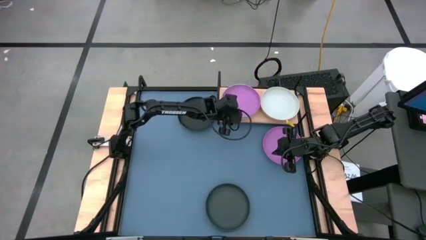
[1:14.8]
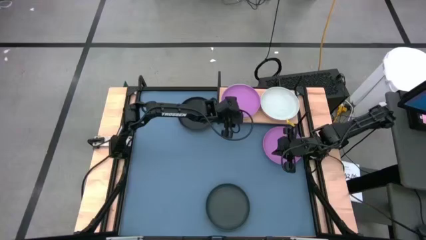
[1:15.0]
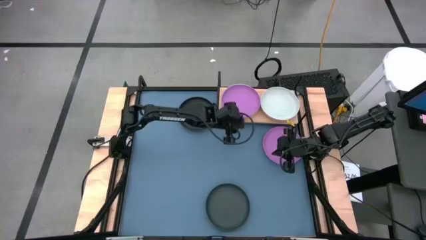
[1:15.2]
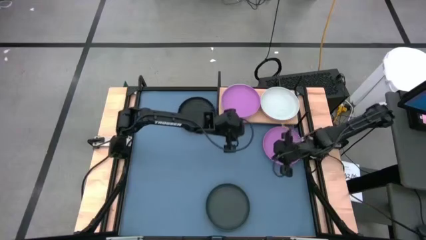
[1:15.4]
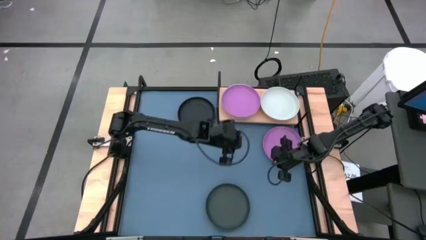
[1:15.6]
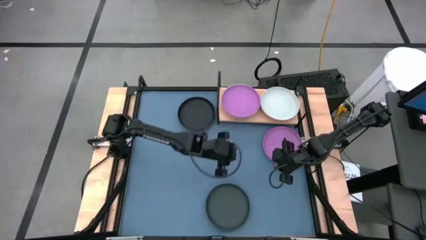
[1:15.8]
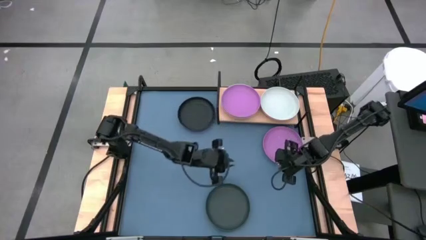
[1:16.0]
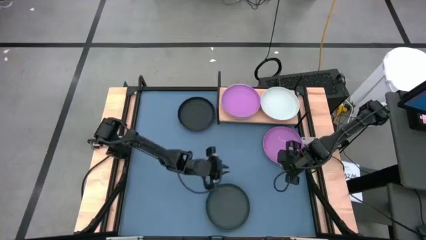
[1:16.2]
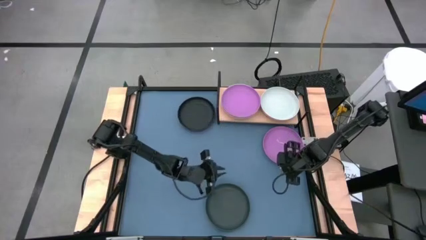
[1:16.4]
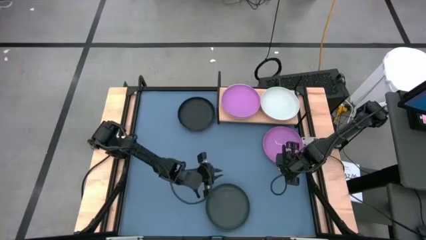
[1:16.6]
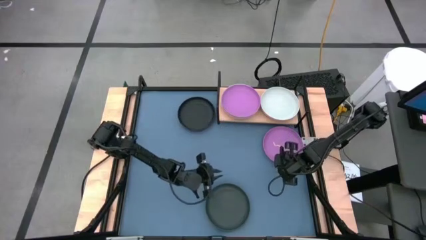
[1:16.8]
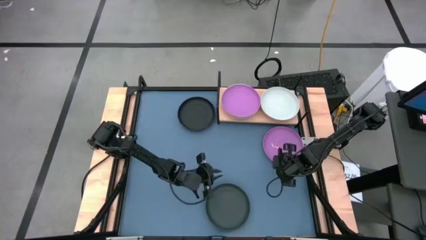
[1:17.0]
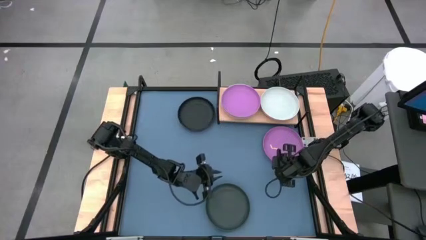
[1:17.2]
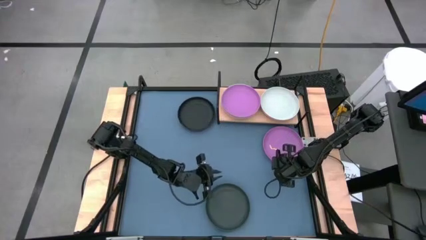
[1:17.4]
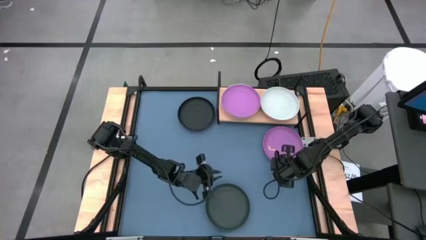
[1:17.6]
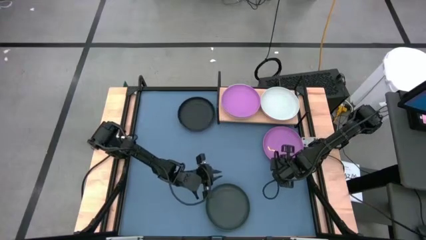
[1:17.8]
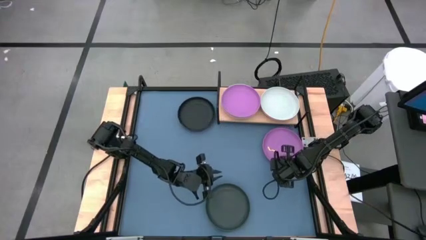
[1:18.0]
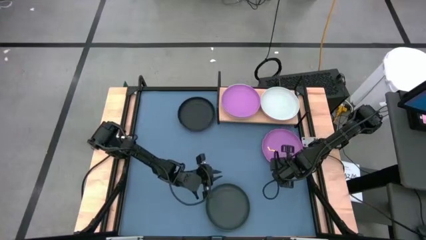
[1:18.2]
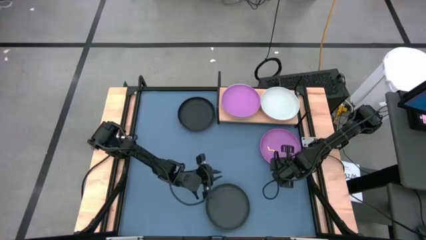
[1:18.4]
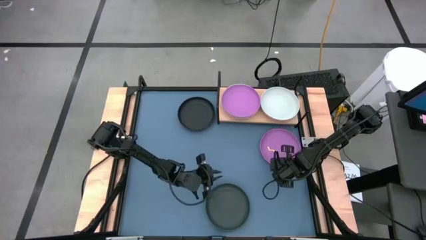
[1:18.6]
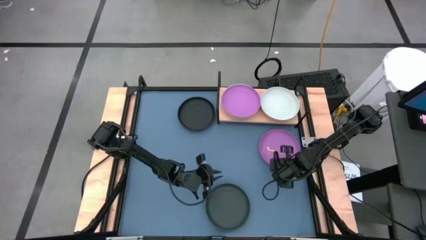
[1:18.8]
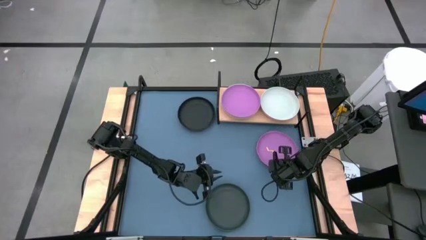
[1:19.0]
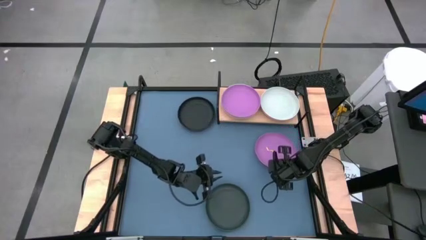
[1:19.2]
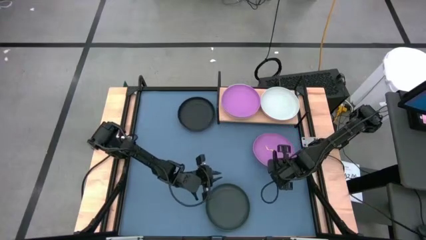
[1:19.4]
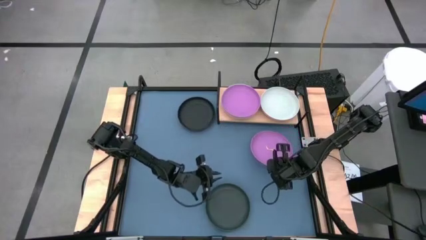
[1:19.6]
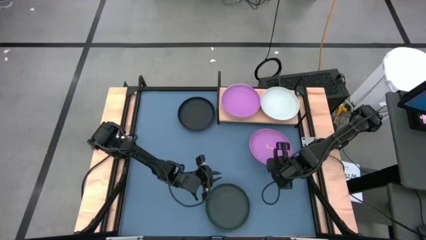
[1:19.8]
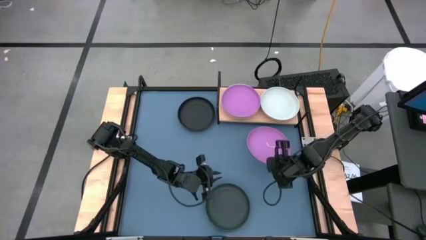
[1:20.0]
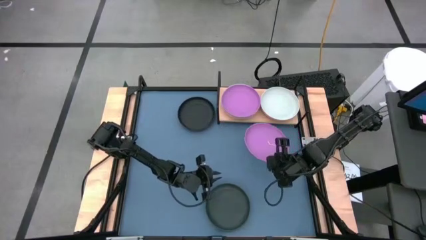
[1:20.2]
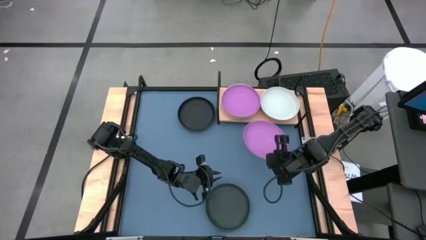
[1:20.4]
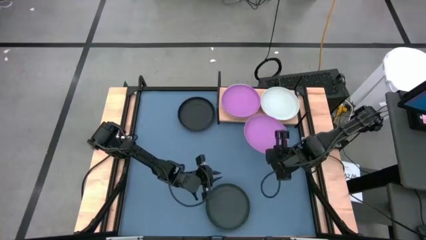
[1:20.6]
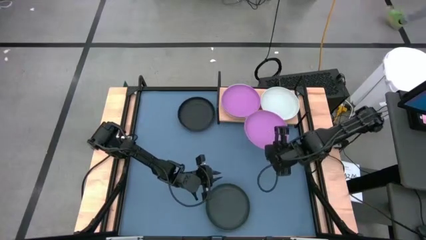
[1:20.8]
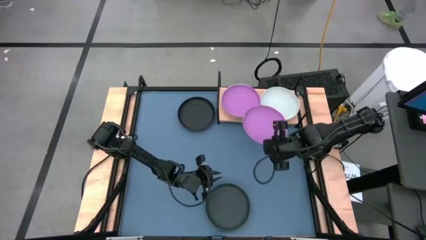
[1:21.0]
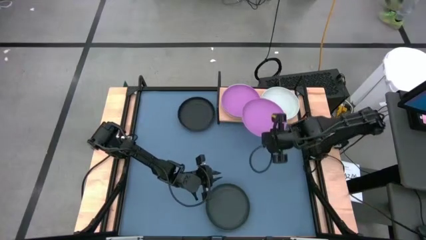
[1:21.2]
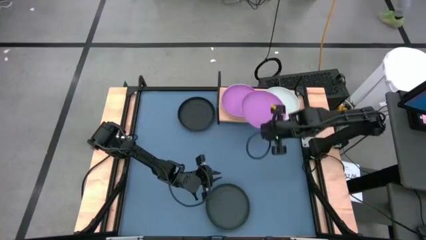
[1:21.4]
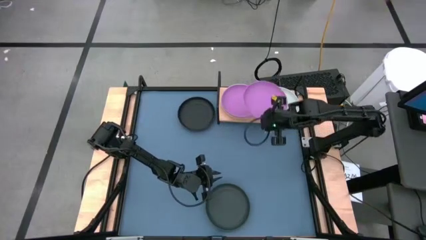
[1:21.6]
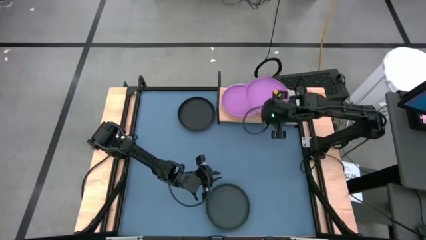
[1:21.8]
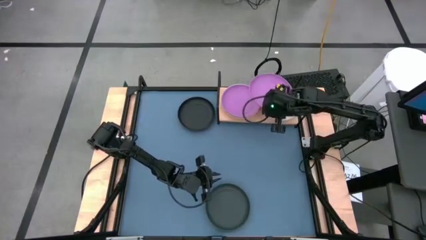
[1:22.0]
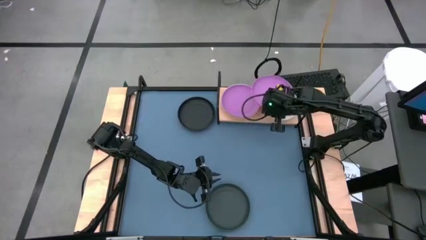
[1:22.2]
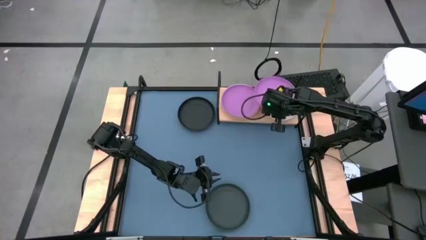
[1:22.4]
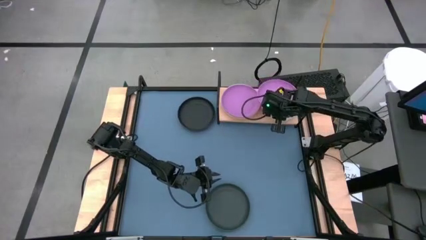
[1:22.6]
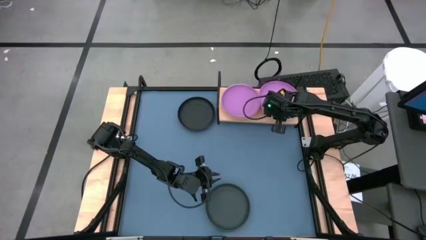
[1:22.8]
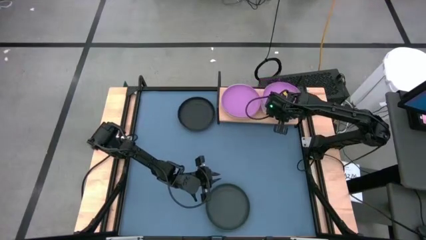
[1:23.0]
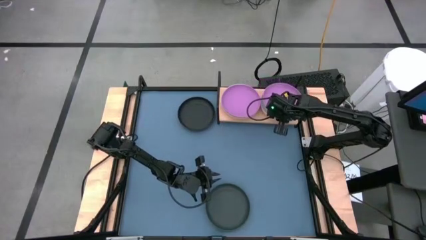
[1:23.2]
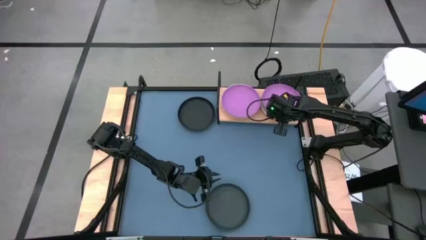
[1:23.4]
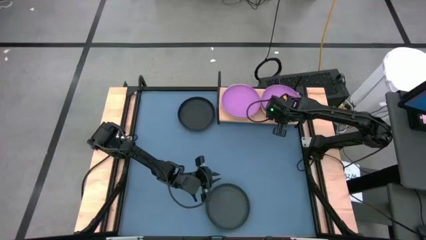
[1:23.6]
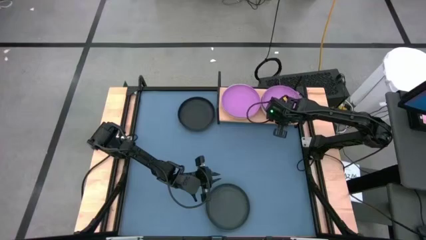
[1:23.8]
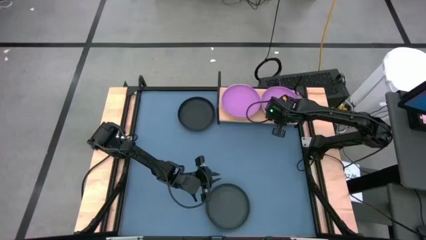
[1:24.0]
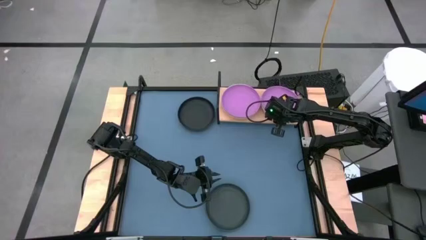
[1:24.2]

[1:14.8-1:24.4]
Task: Place and stack plates onto a shelf
Stack the purple plate on top of the blue plate on the shelf

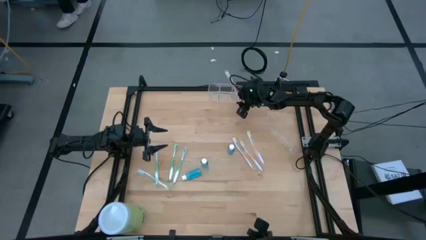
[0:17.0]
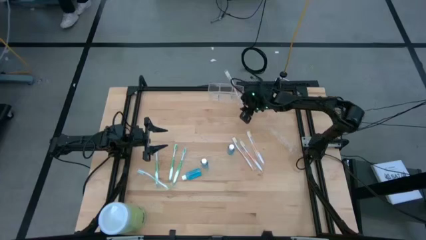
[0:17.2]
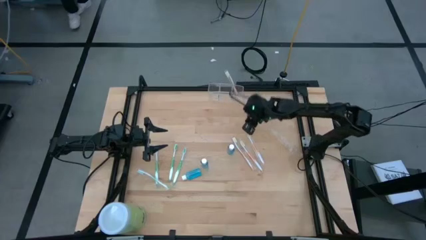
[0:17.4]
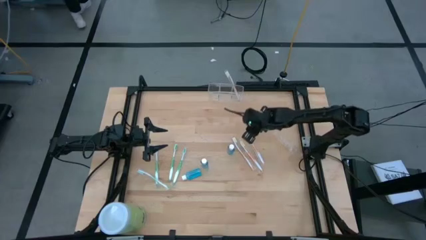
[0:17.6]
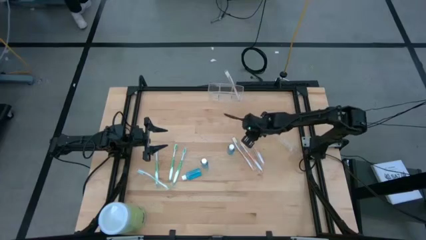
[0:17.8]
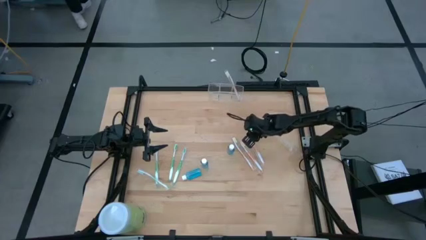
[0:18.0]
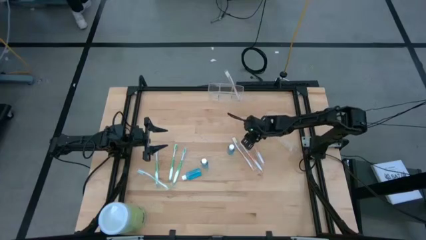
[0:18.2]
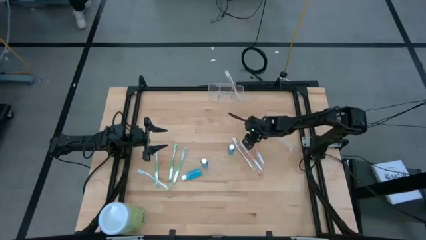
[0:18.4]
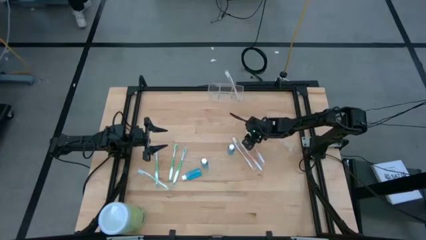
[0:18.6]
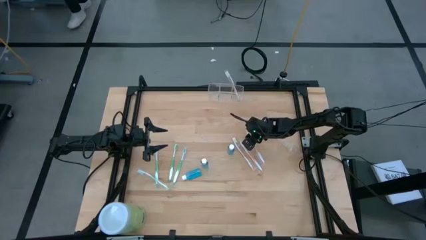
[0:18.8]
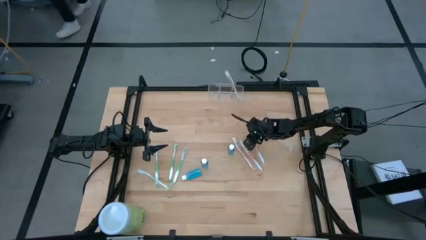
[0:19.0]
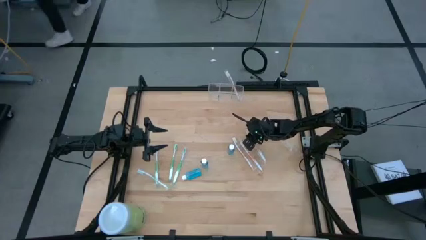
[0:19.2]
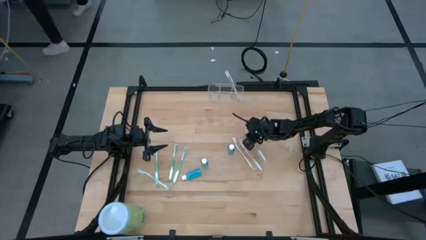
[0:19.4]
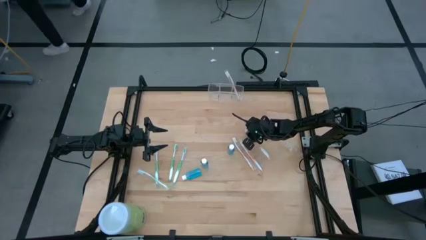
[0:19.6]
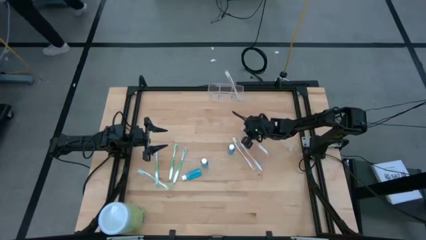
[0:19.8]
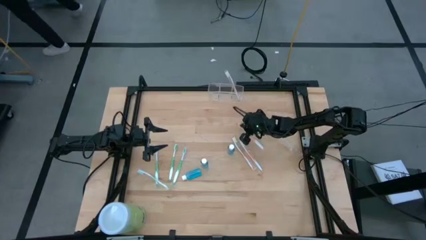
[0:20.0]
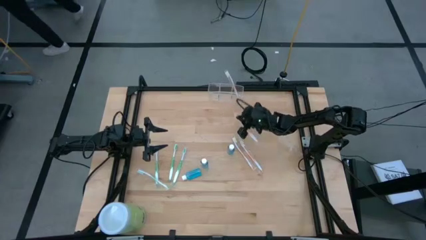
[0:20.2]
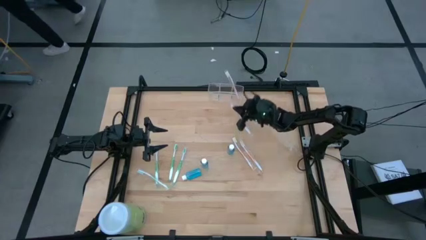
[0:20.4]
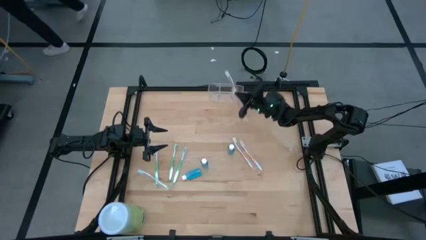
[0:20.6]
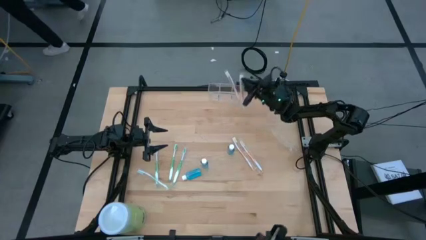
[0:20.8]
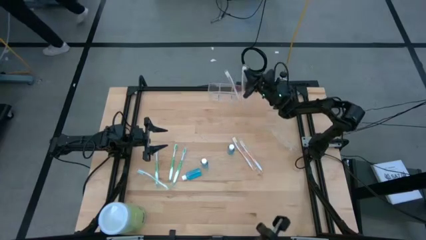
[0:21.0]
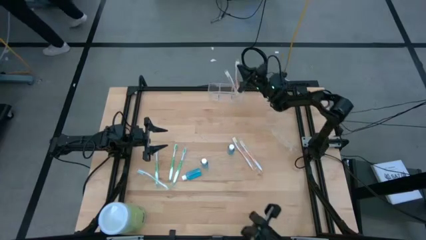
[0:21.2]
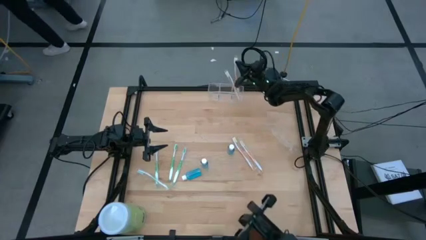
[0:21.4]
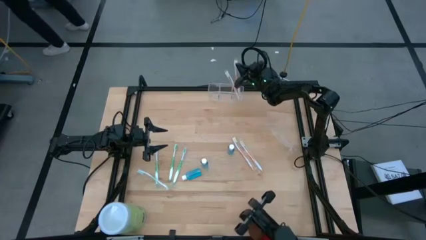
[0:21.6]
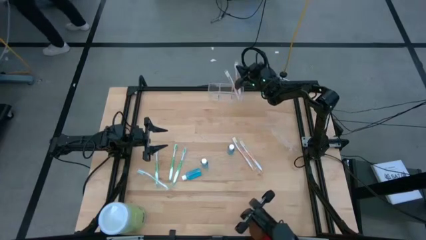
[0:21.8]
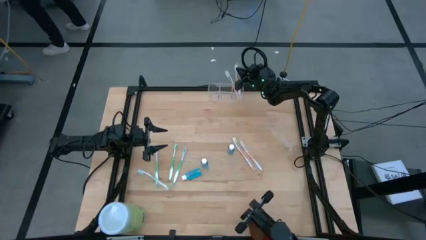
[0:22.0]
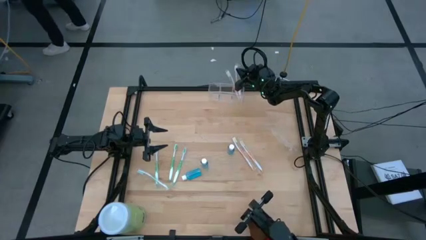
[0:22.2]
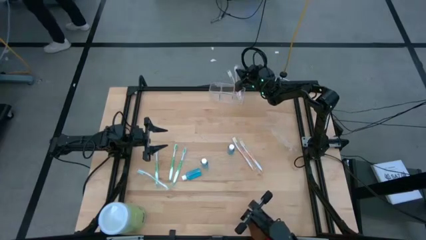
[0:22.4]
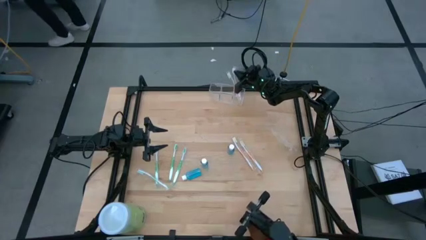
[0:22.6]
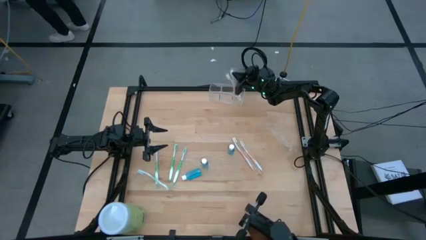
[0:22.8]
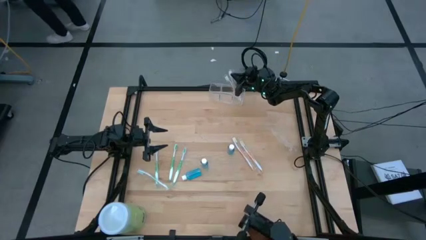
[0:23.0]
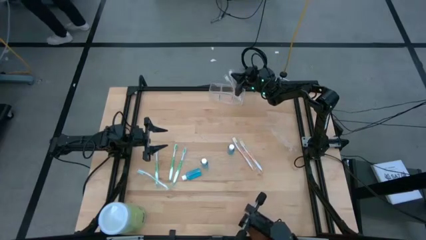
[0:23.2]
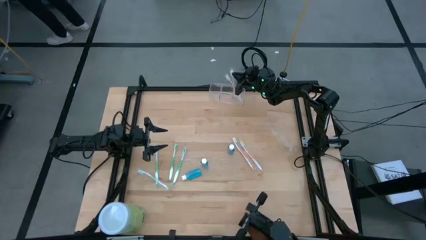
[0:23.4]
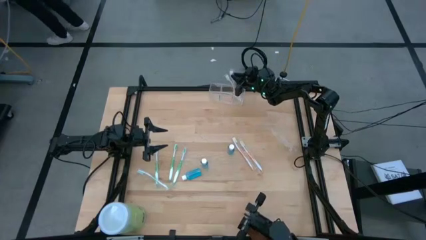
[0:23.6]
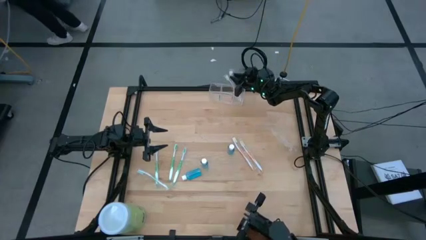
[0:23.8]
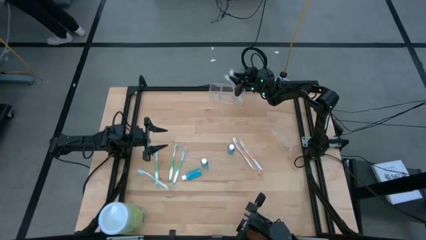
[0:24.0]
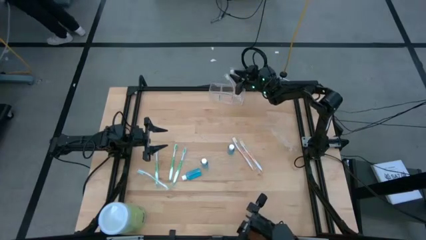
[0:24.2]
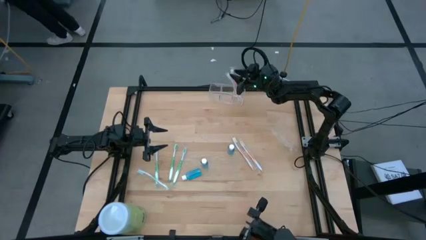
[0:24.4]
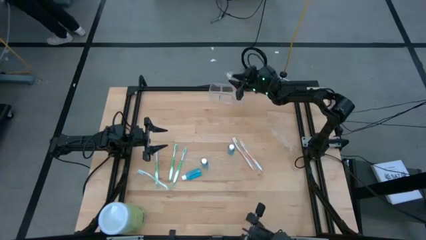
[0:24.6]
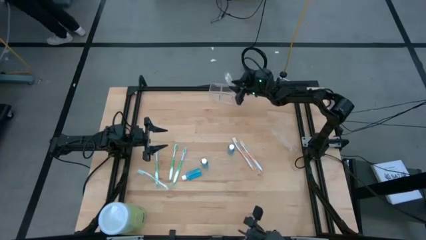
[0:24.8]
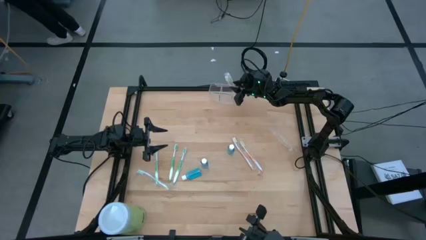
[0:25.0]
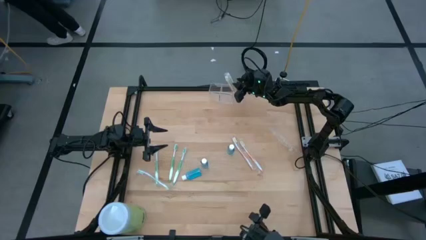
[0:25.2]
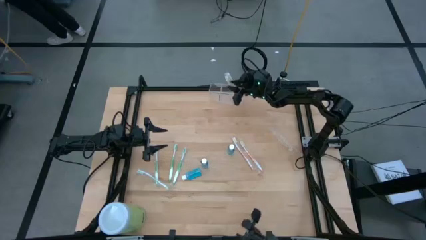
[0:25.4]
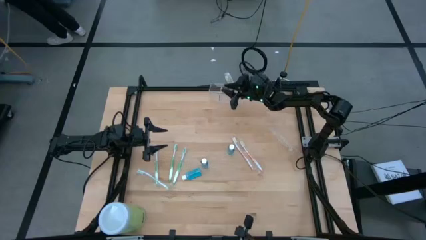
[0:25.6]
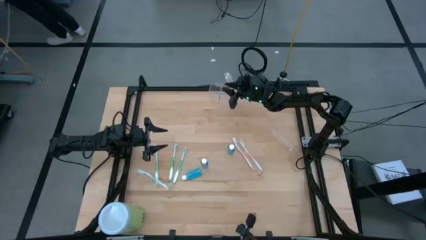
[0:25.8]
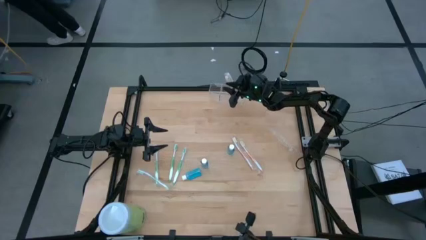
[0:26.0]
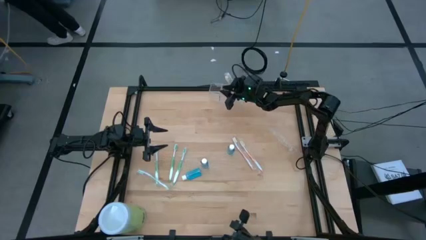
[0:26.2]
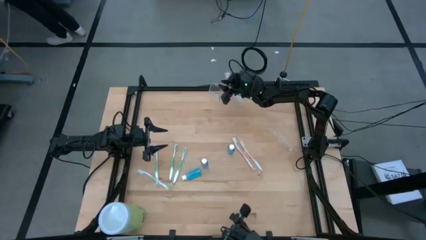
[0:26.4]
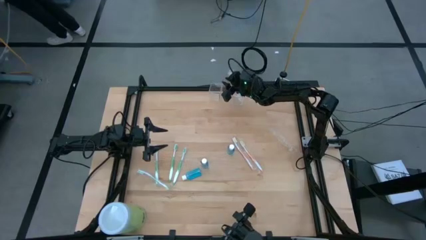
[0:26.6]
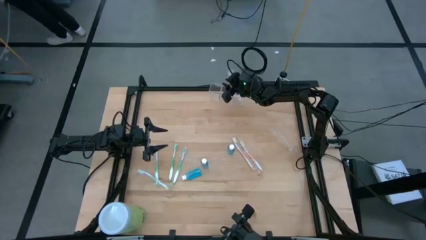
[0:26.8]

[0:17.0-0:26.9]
Task: Pick & Place toothbrushing station
Put the orange toothbrush into the transparent organizer
